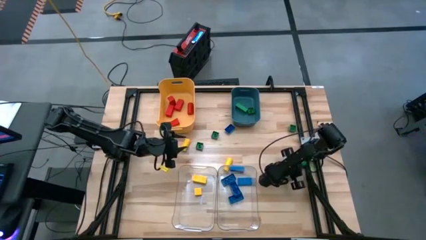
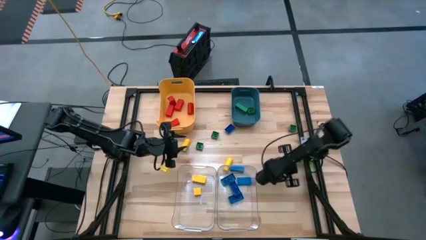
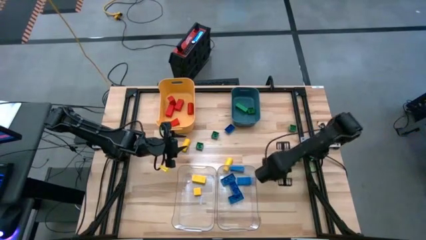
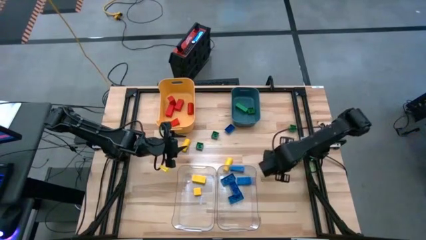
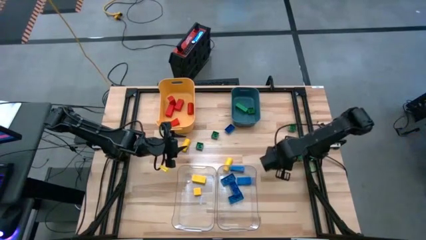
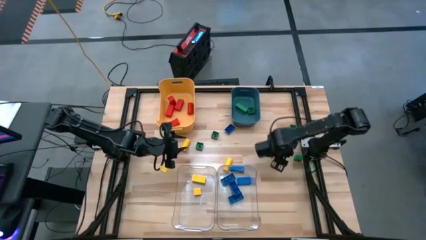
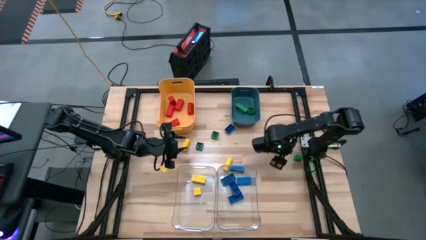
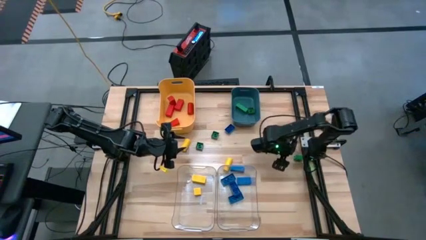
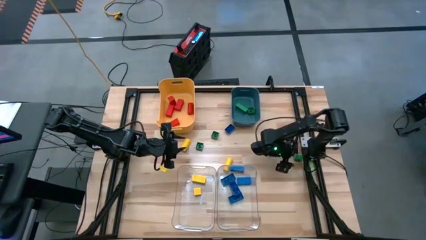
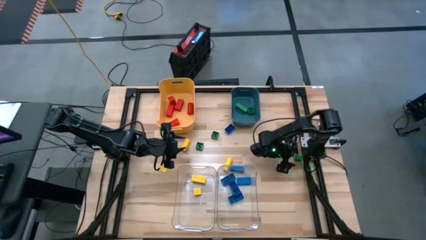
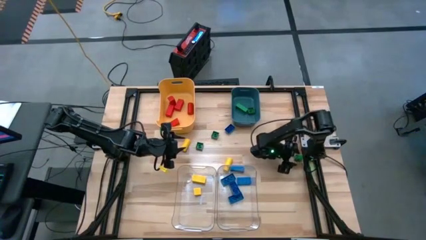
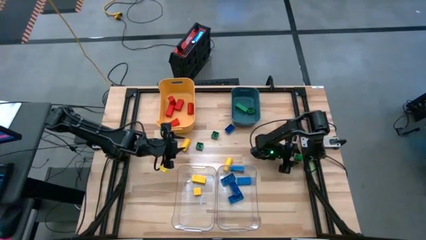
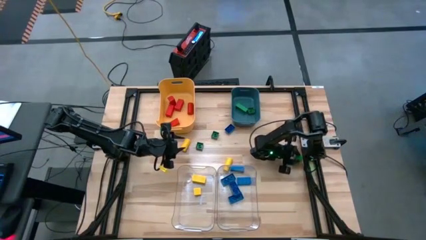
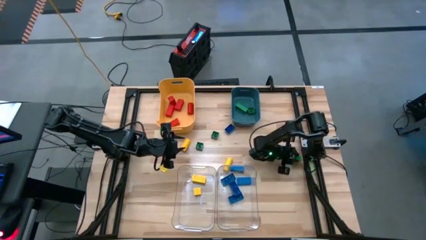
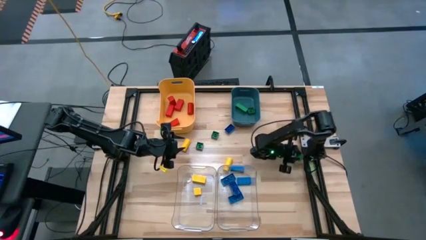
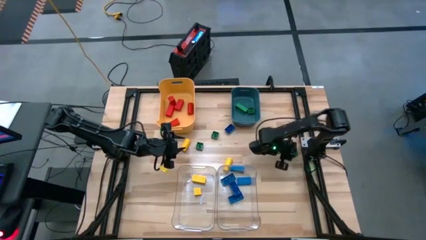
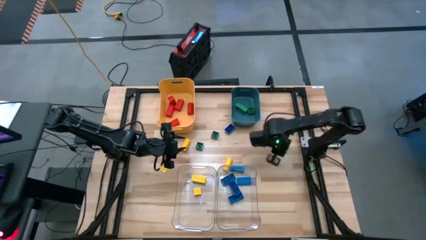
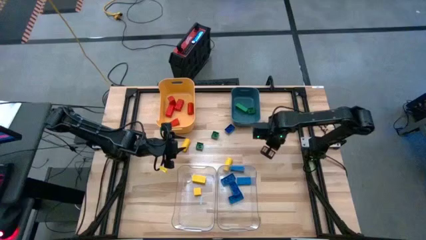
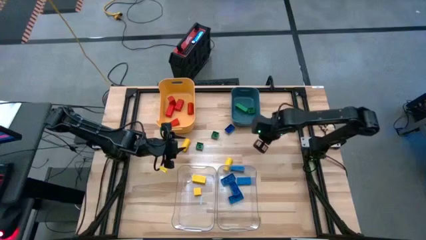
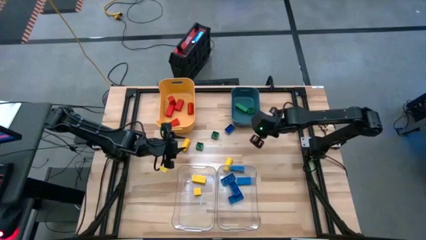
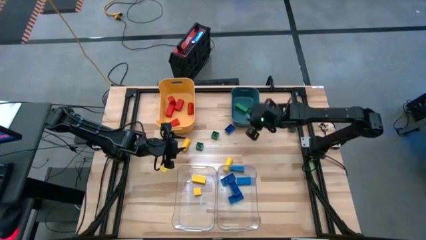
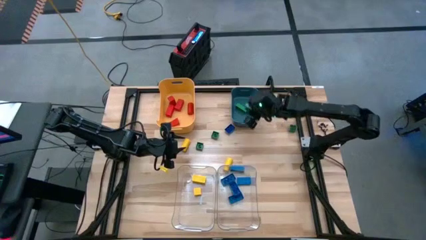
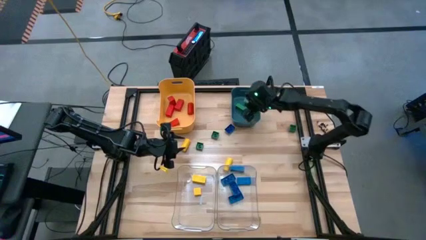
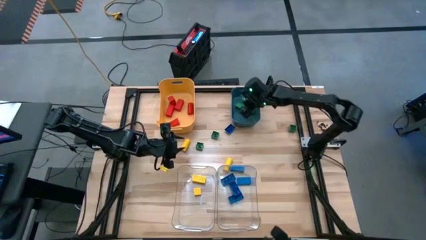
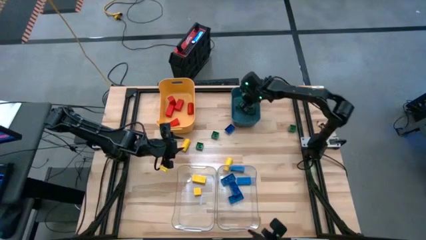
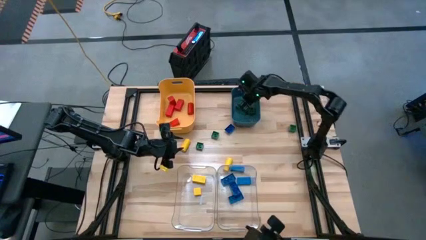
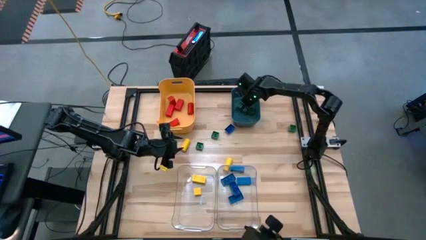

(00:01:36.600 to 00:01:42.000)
Task: Sort blocks
Put the green game piece into the blue bin

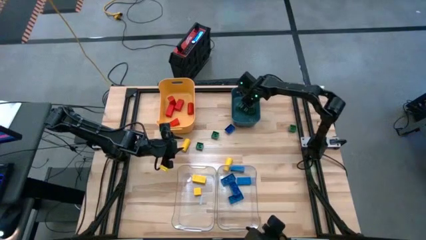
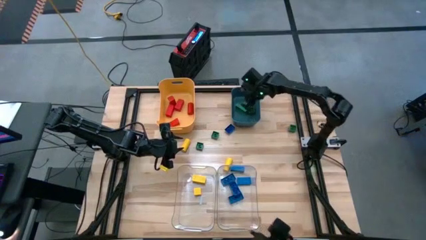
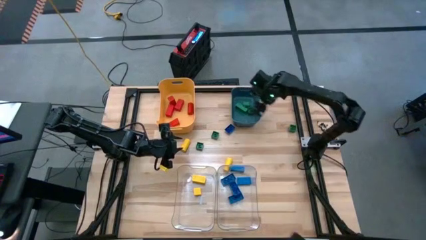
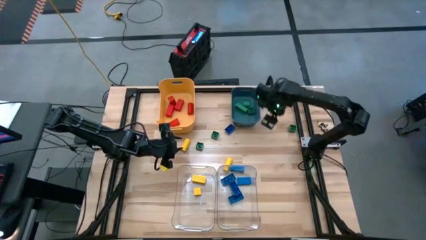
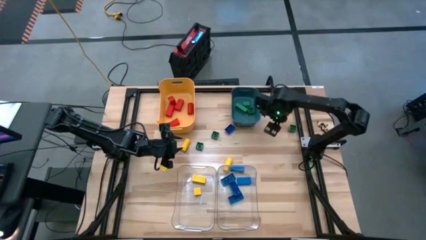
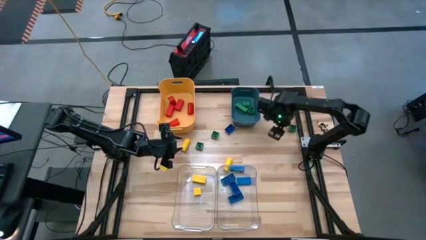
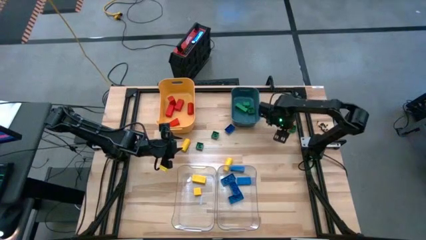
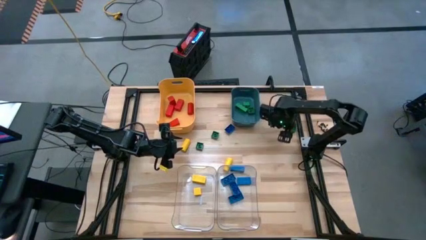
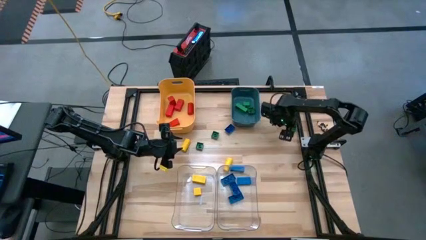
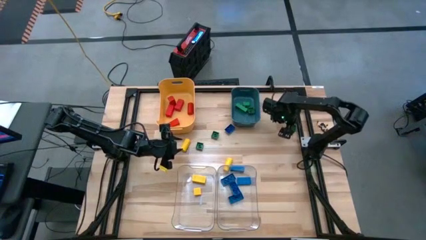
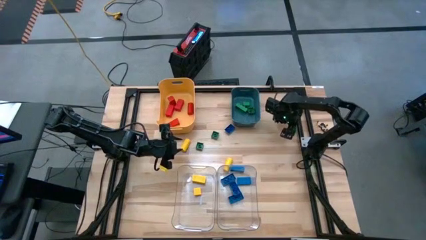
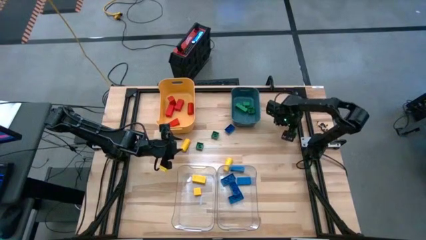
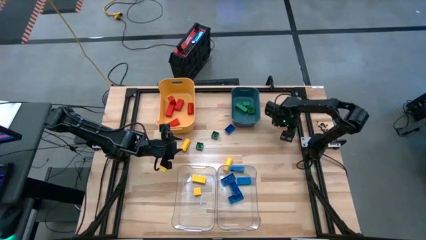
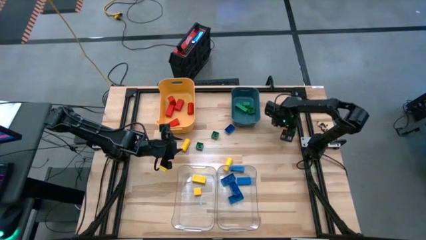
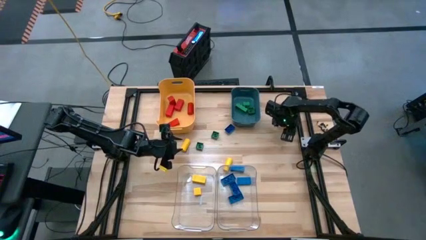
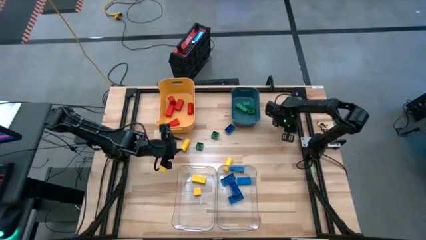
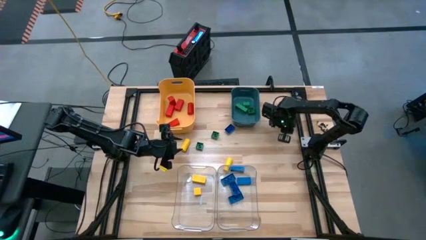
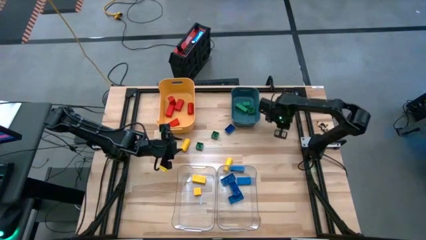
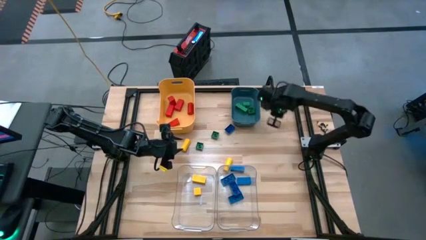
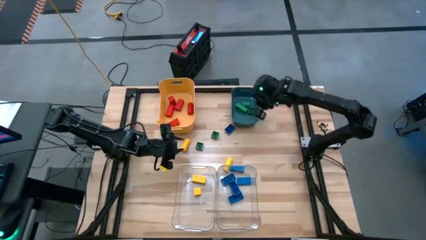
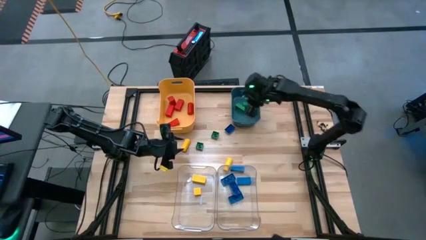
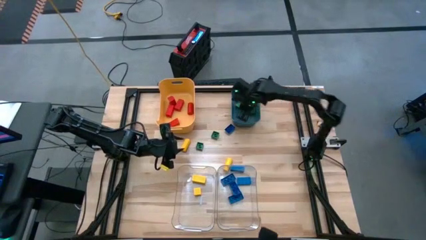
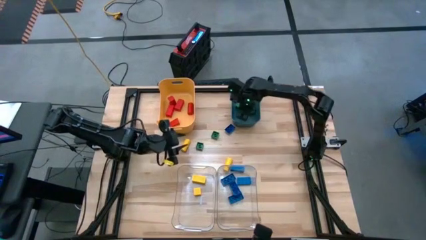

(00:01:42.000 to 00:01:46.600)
Put the green game piece into the blue bin

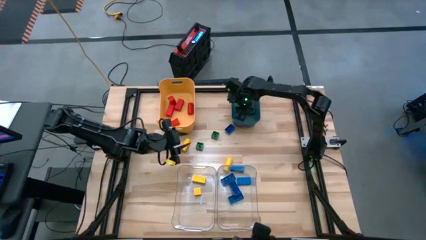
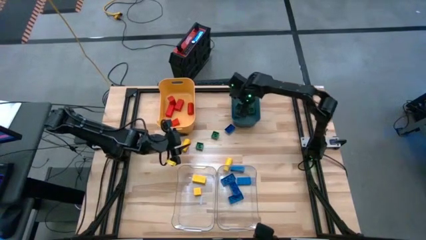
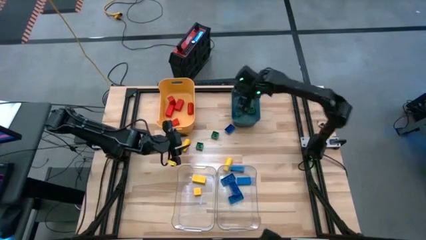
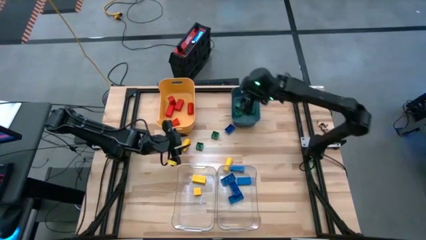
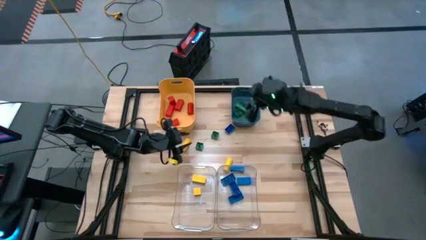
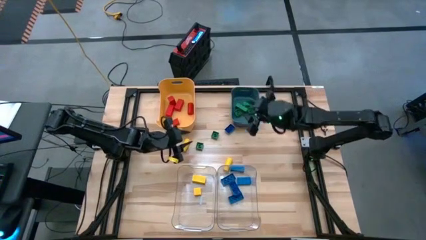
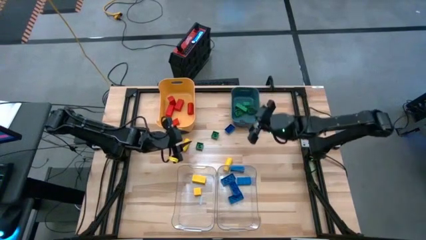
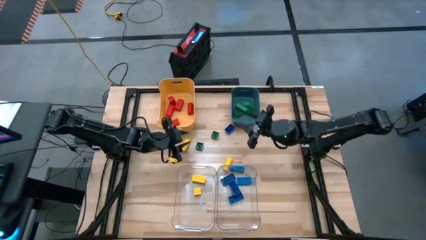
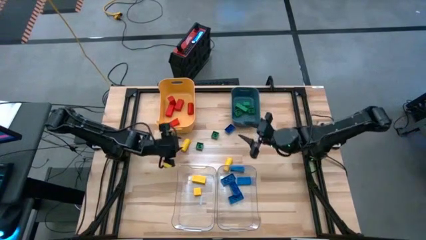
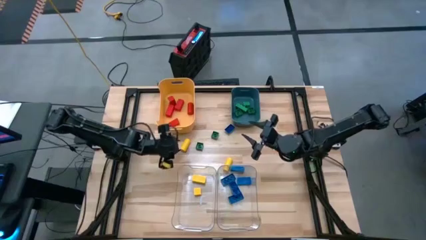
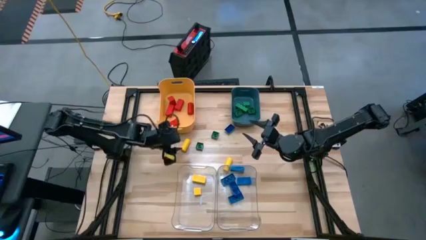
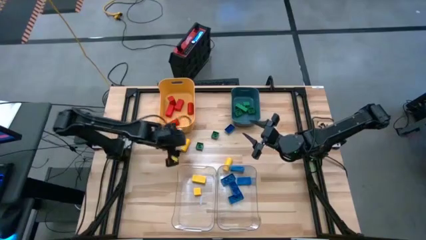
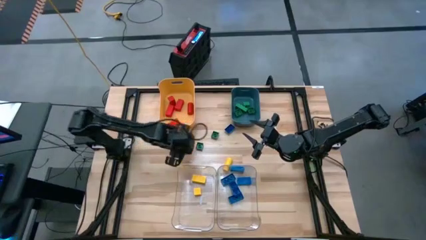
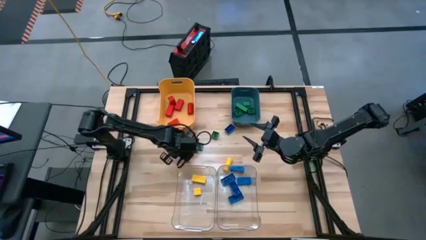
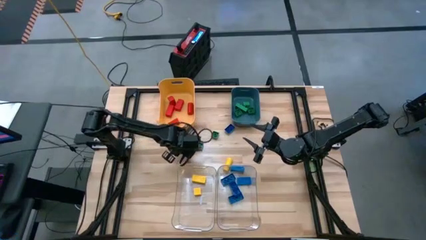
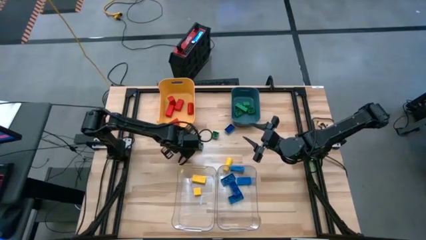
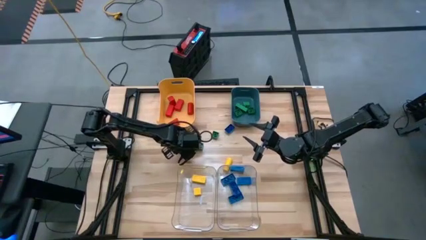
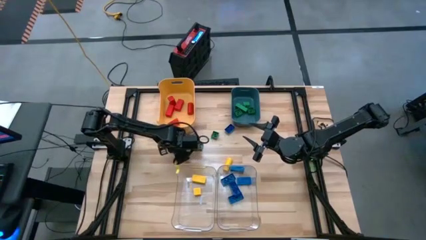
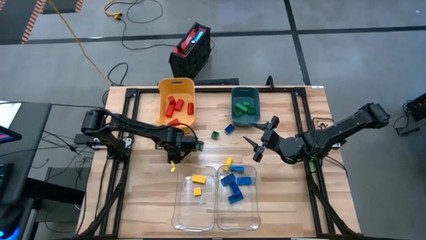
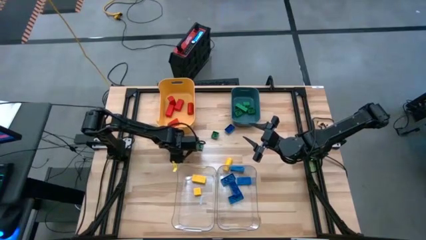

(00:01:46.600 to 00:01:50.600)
Put the yellow block into the left transparent bin

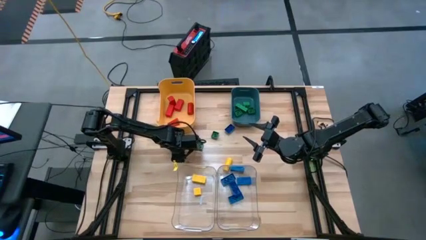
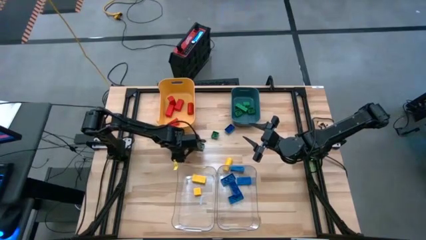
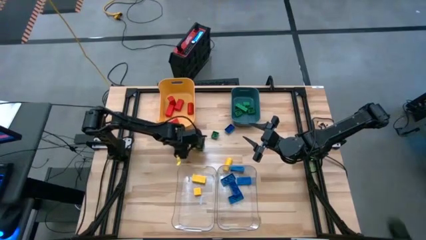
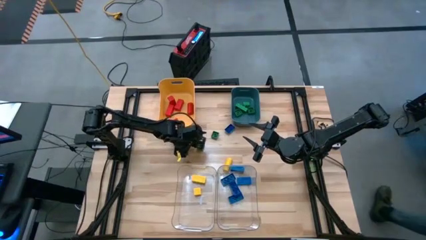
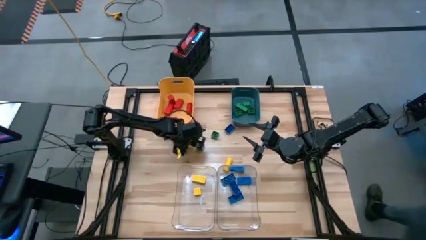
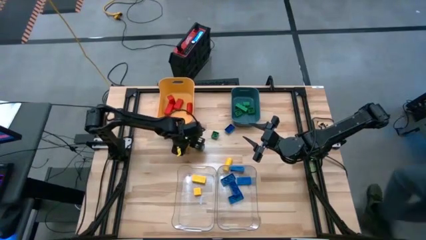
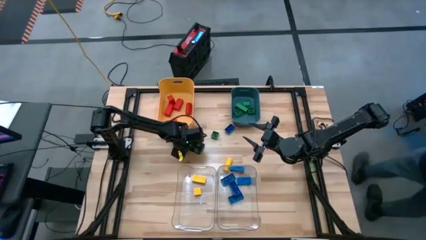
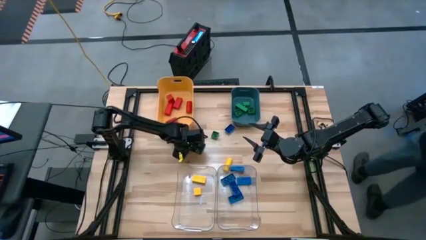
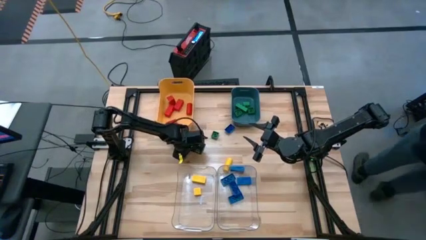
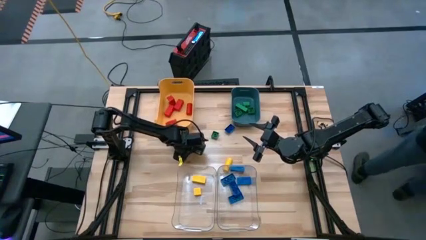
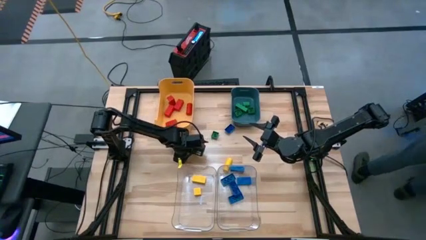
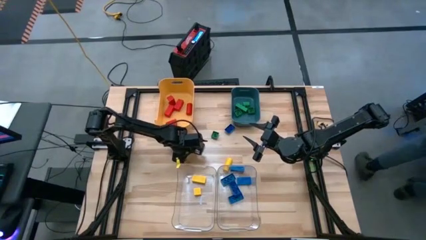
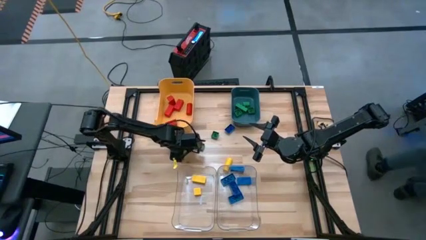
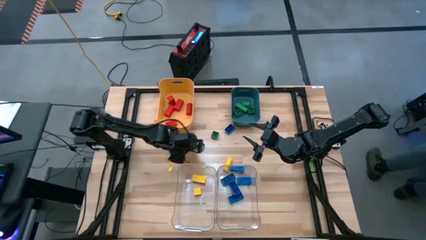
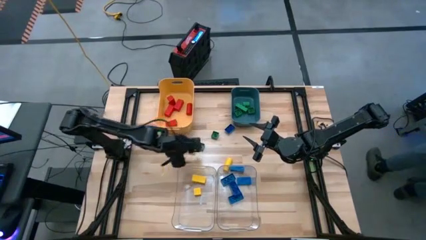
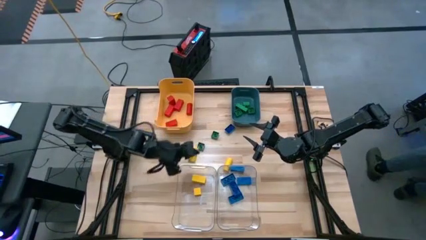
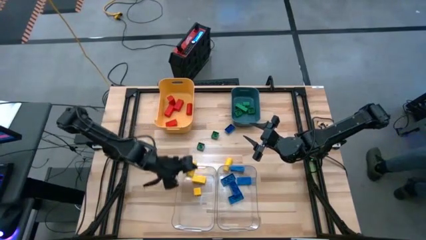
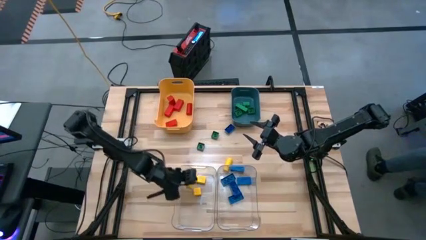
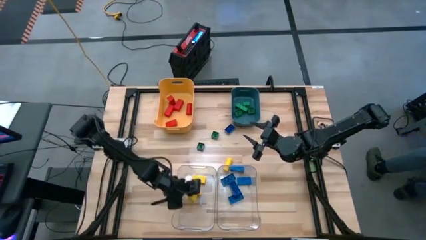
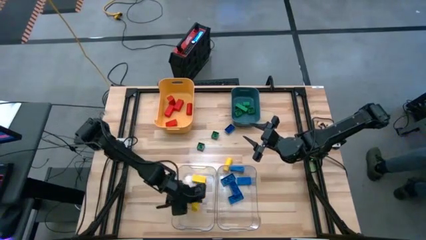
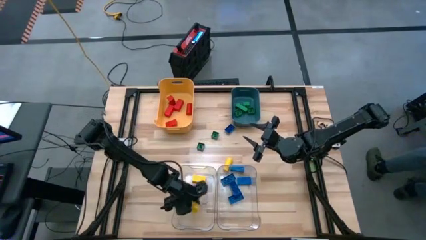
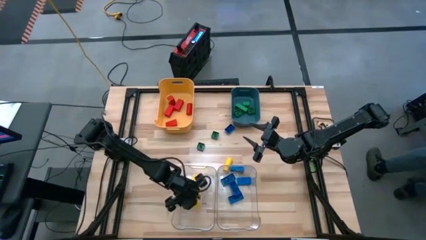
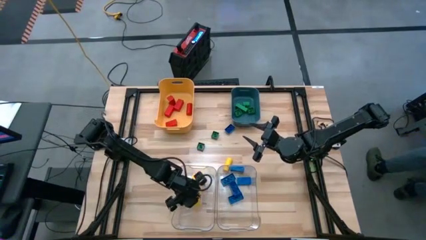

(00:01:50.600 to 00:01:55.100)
Put the yellow block into the left transparent bin
